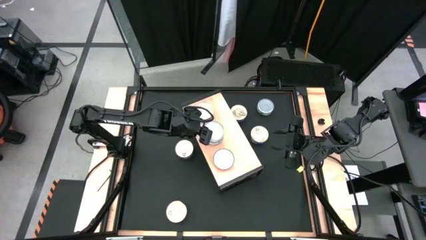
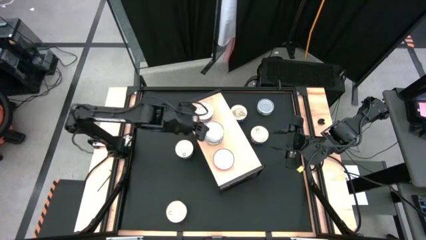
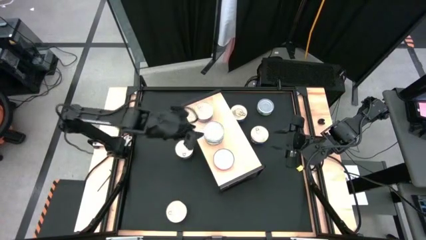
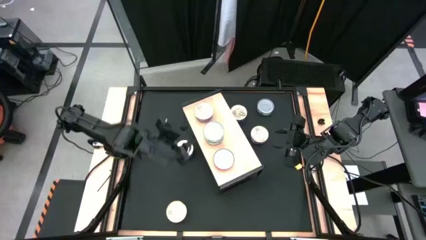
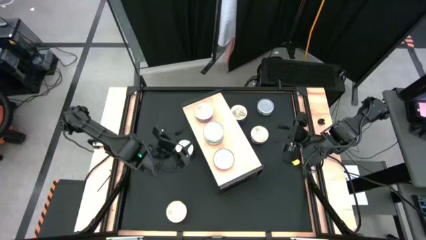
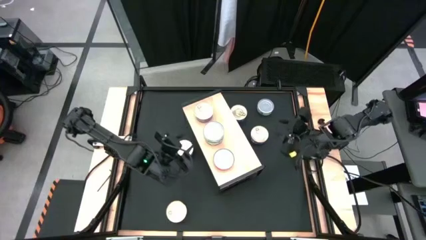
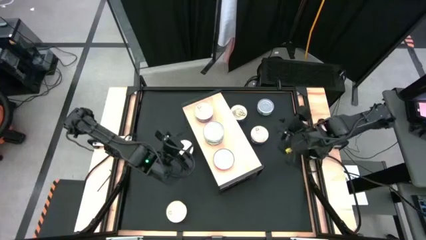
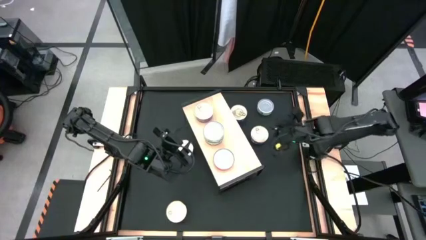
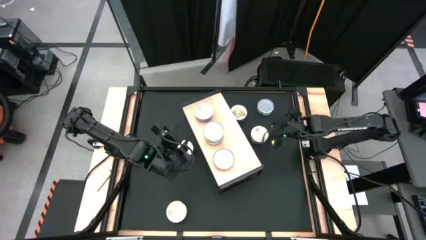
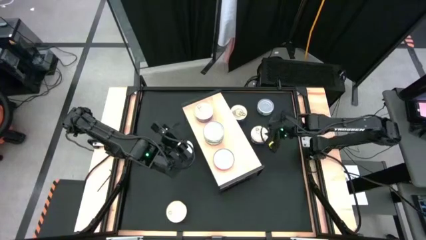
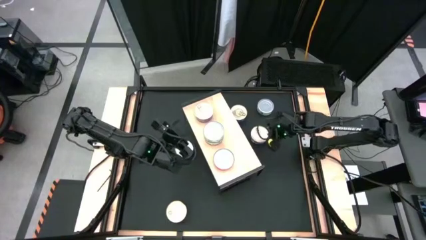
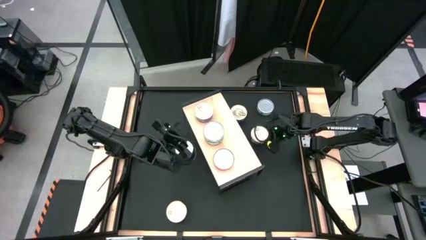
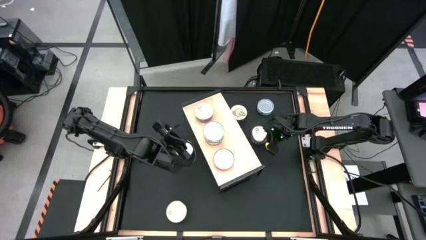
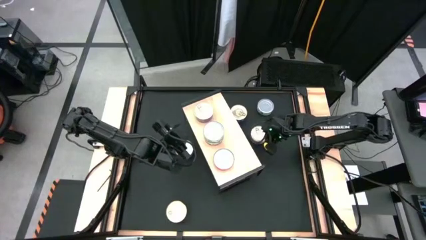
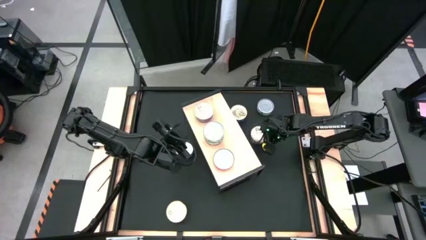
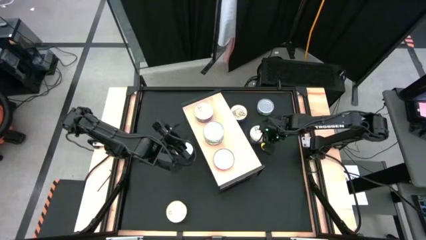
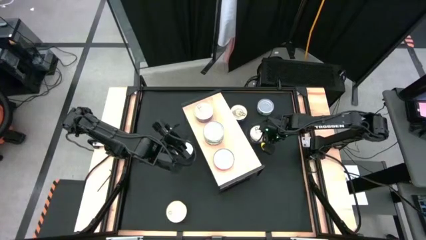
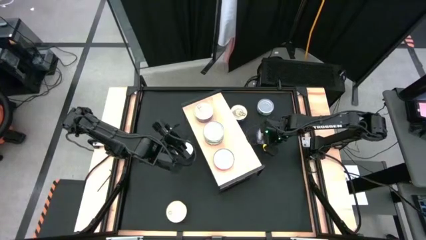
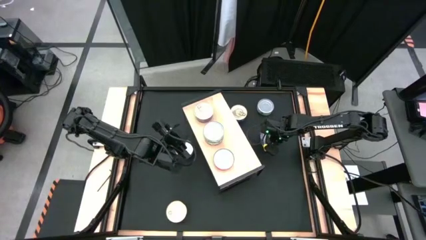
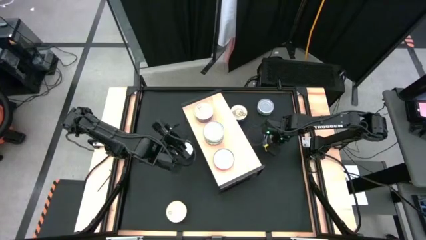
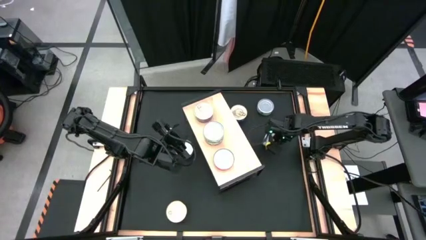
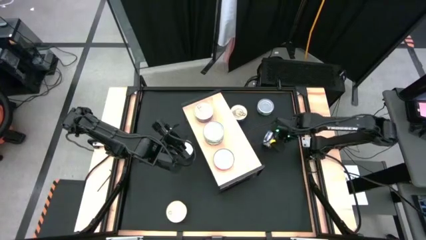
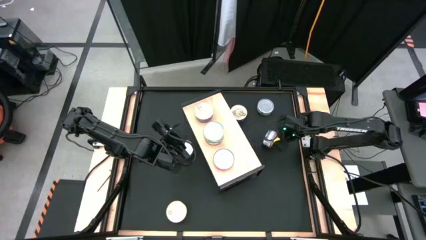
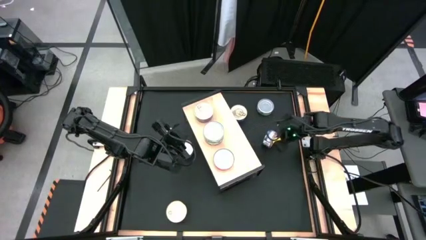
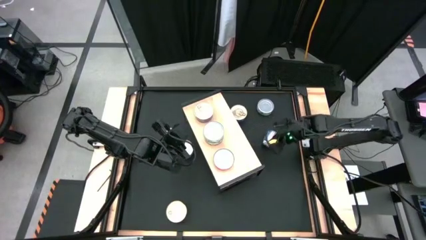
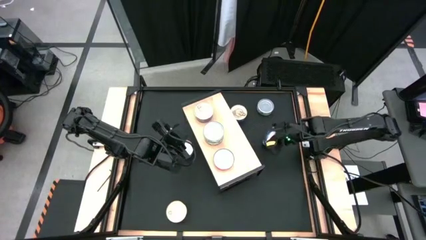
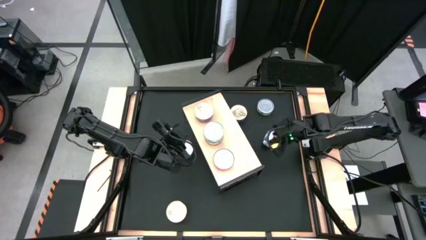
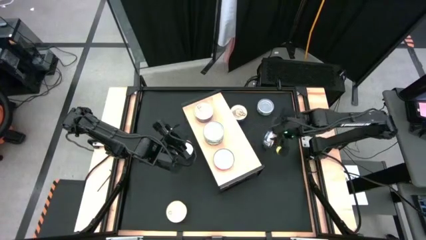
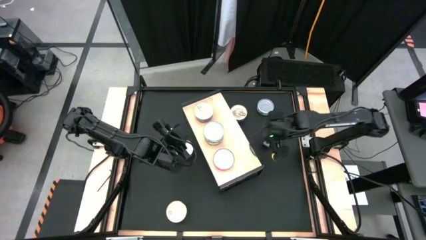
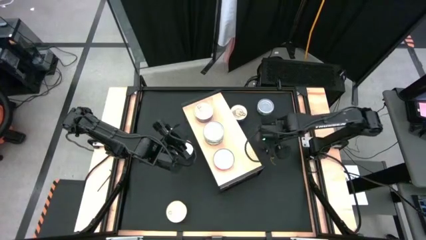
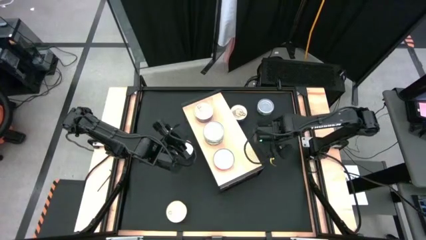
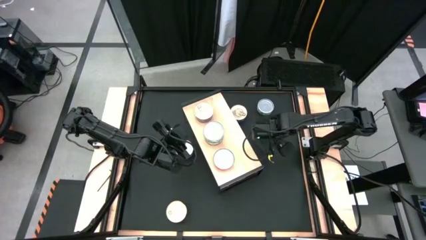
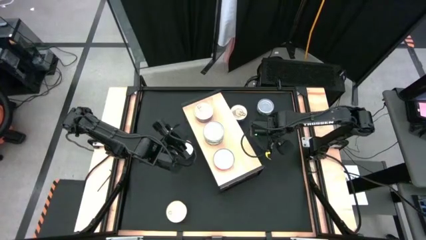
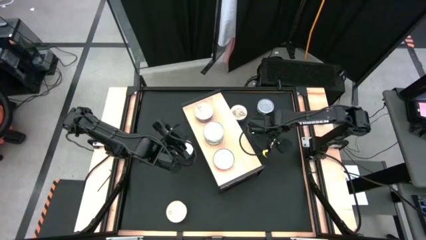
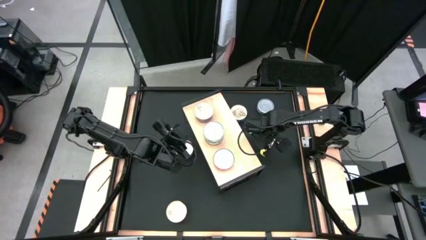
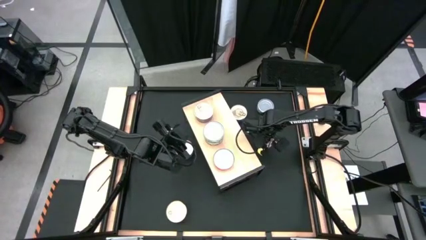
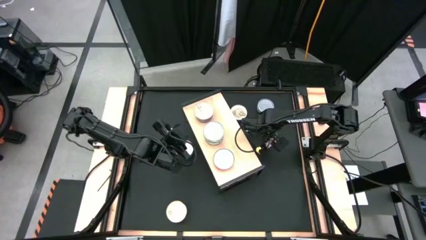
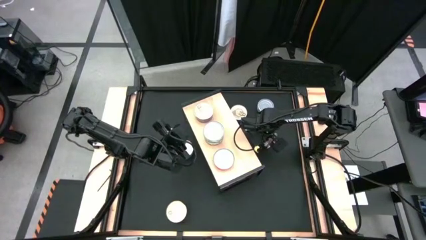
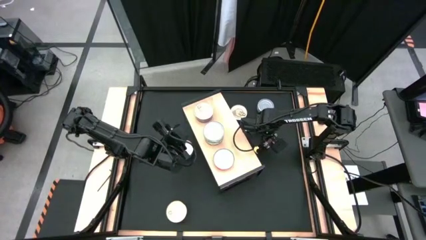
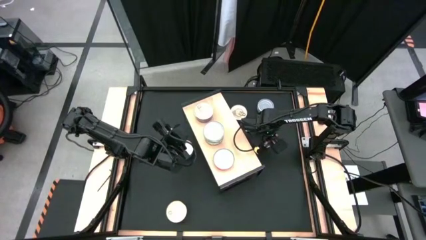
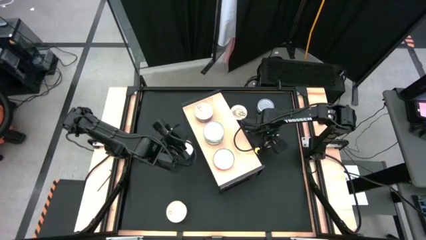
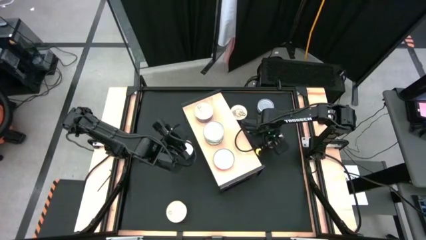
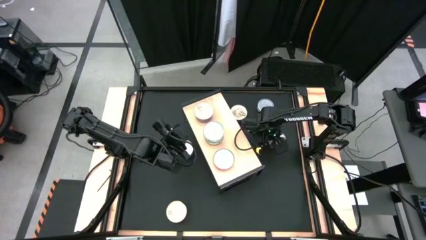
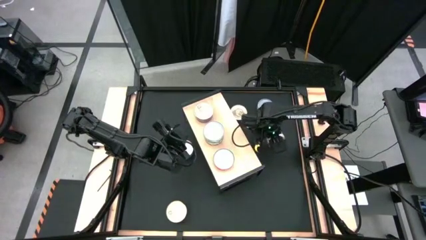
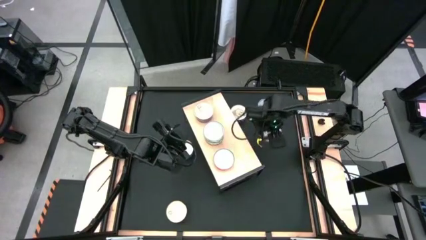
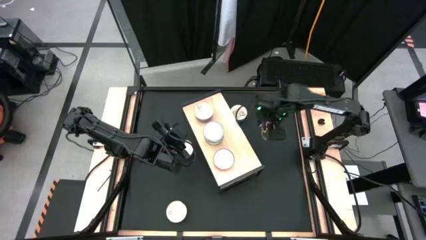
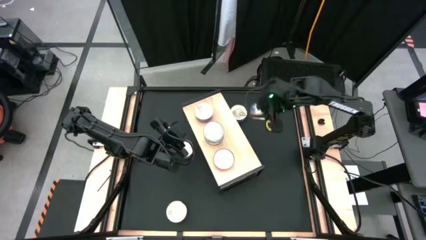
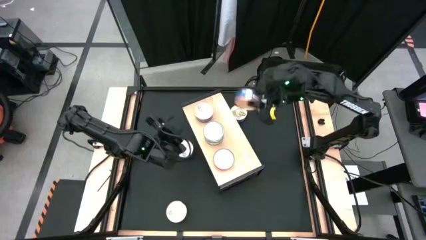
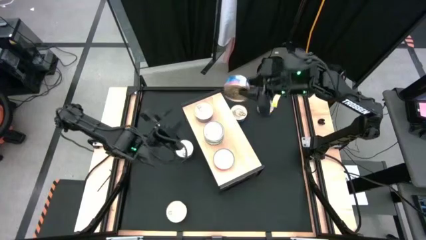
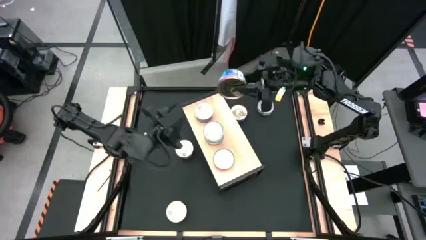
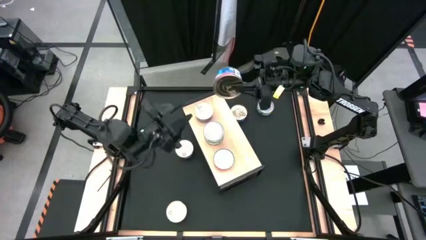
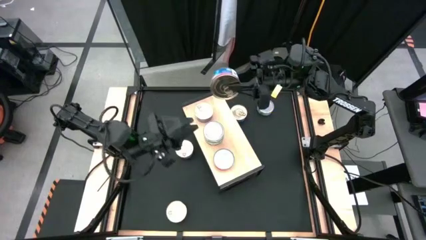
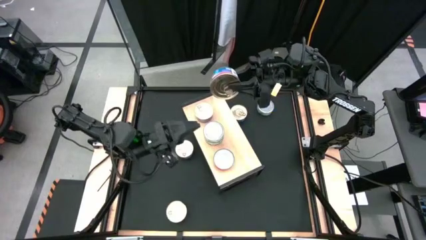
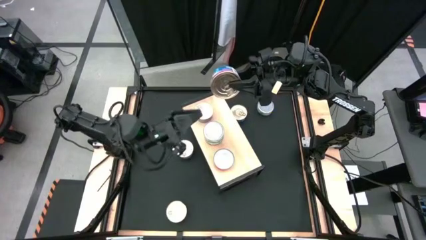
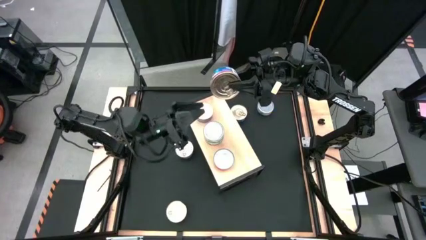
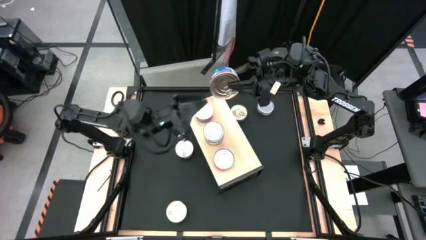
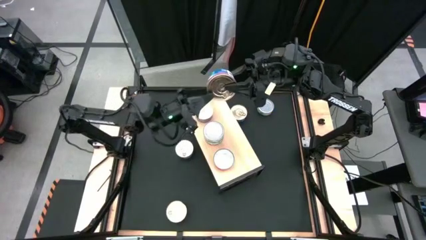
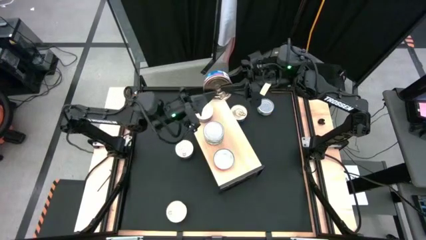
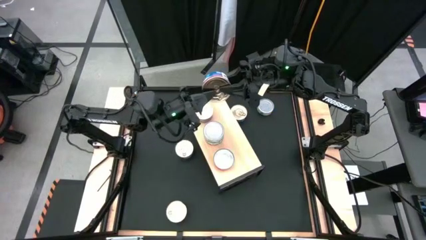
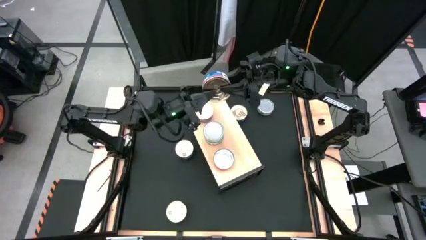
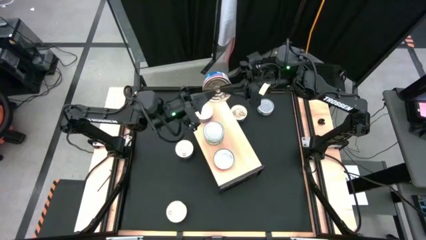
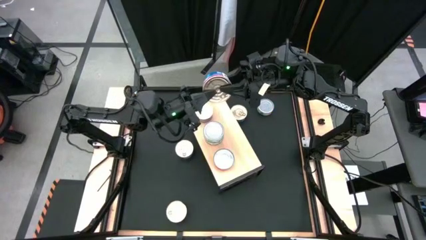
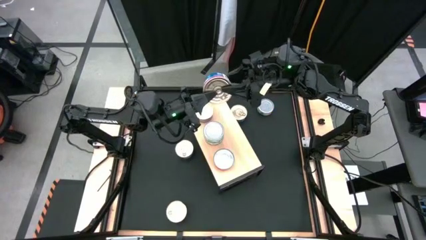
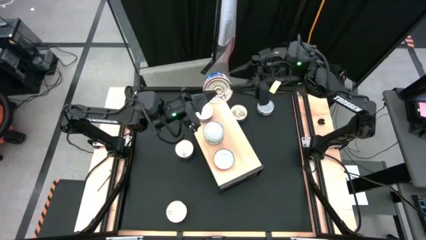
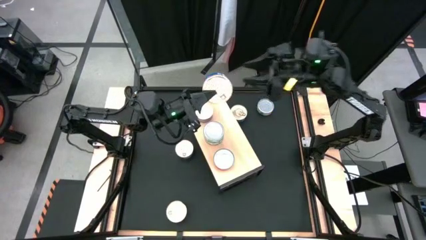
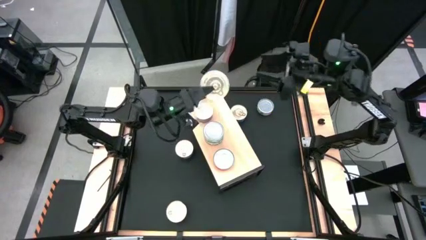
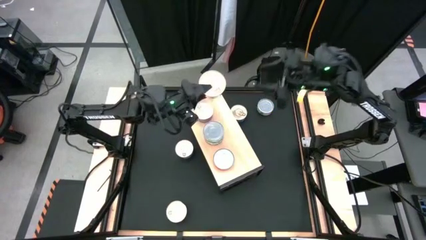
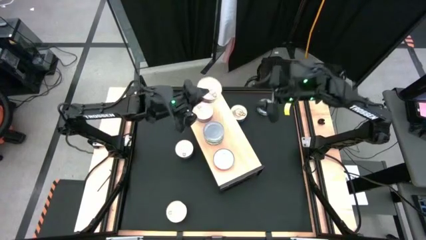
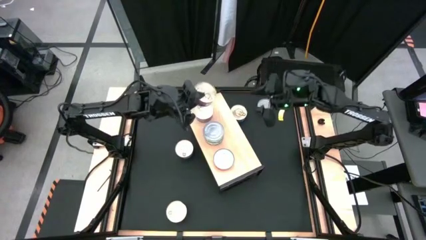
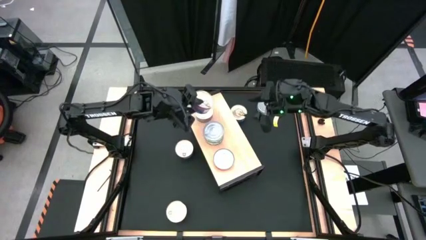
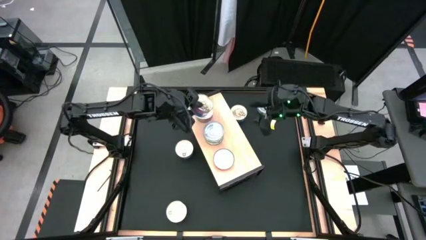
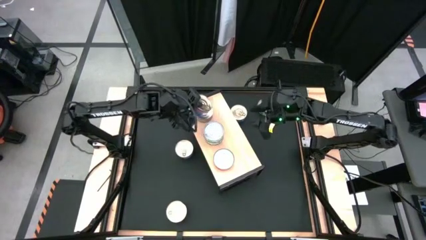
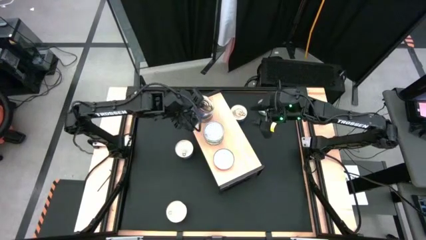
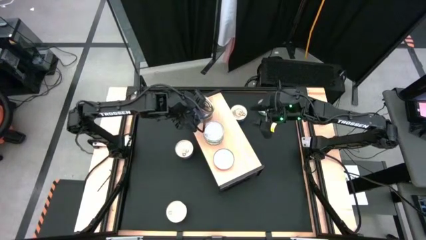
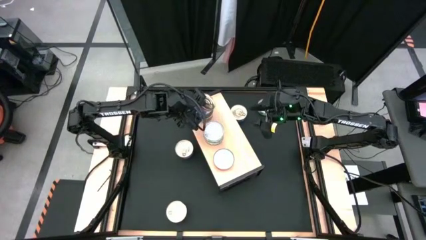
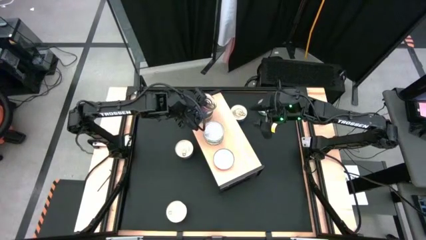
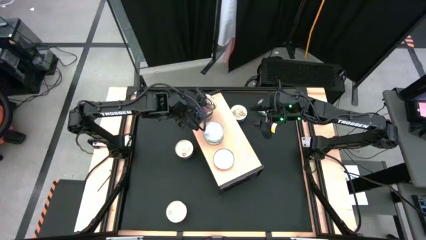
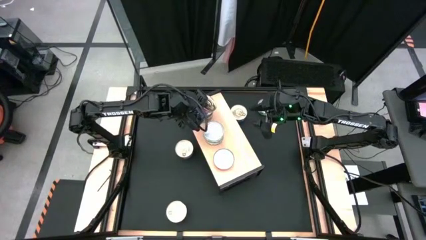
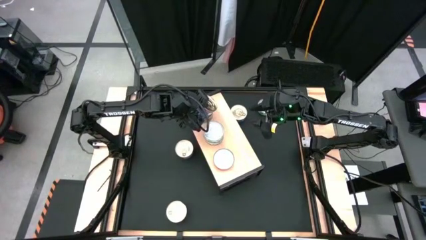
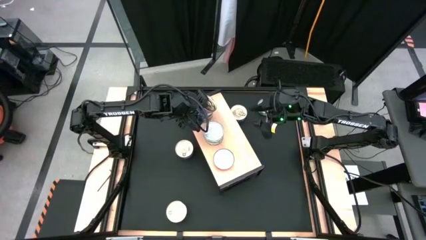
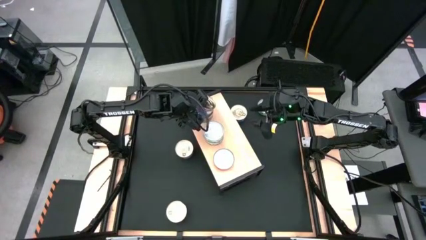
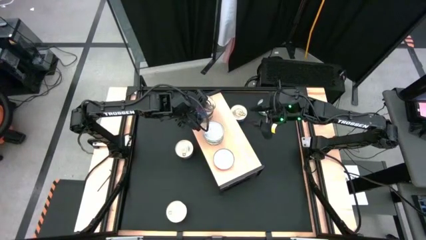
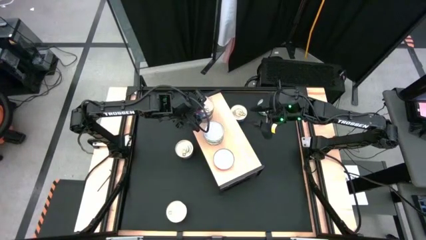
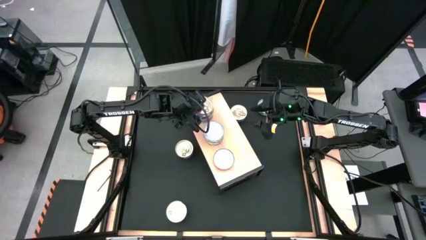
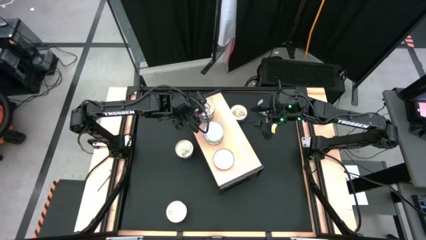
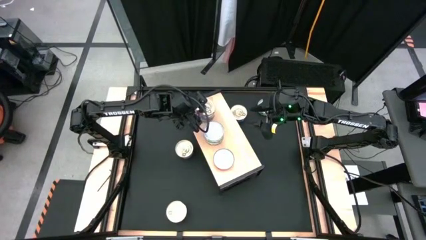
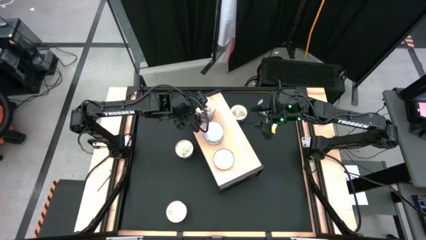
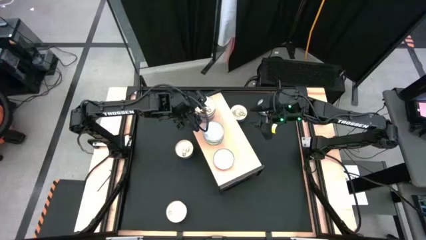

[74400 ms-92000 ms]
Task: Stack canned seafood by type on shelf
Stack the blue pink tuna can on top of the blue pink tuna can on the shelf
